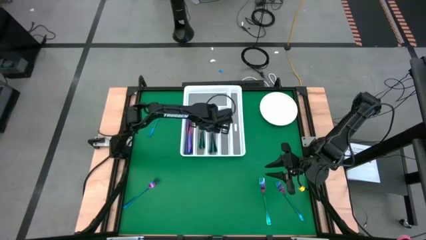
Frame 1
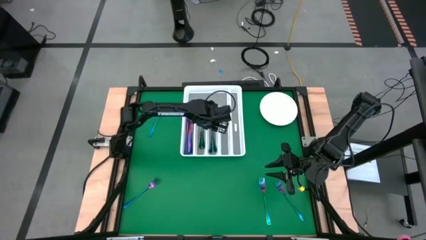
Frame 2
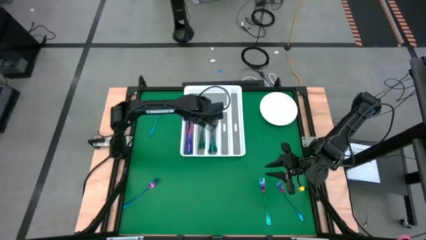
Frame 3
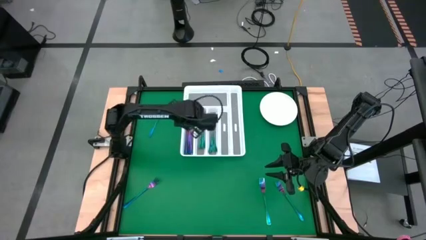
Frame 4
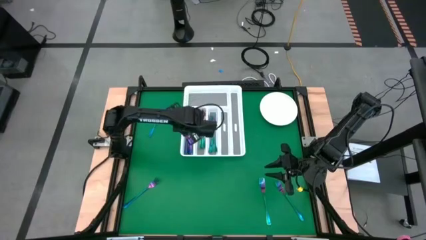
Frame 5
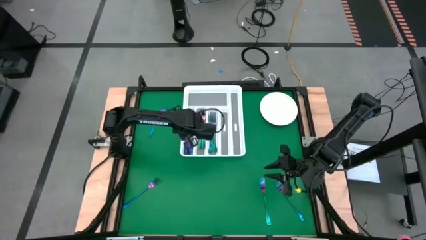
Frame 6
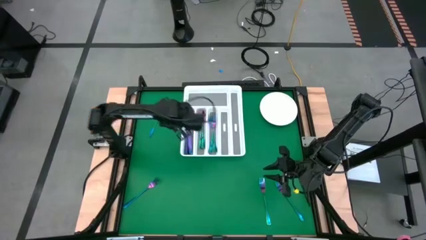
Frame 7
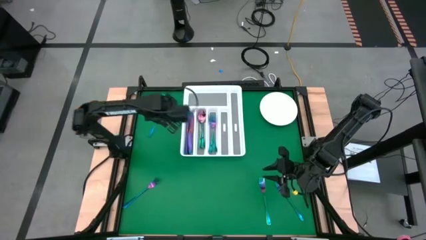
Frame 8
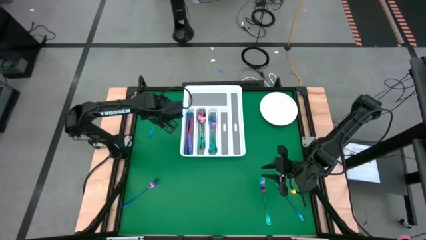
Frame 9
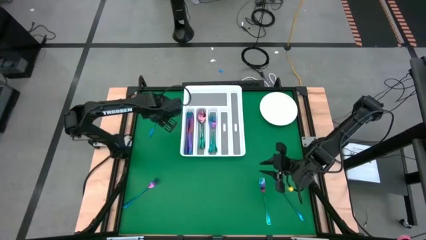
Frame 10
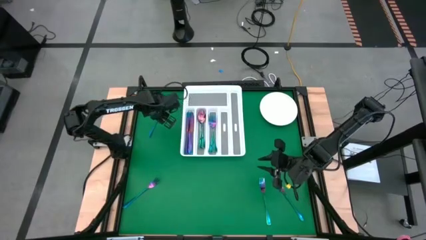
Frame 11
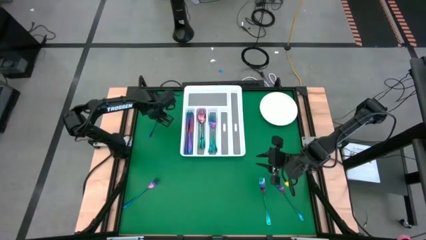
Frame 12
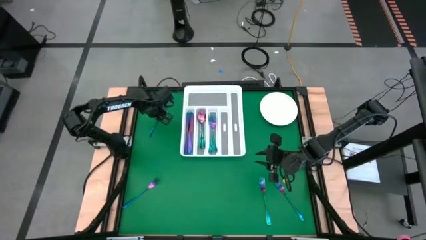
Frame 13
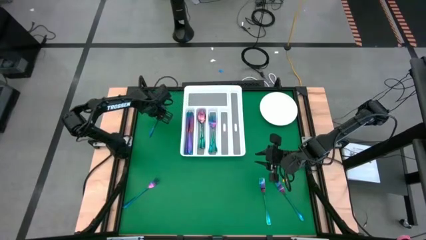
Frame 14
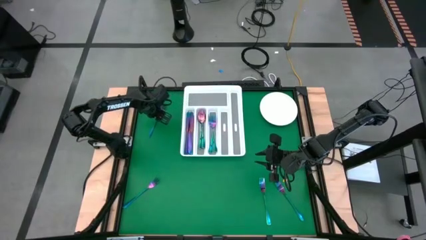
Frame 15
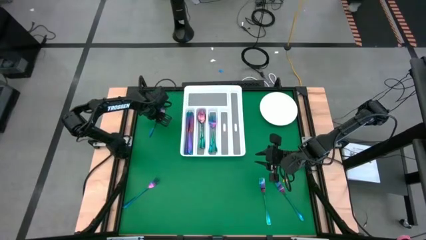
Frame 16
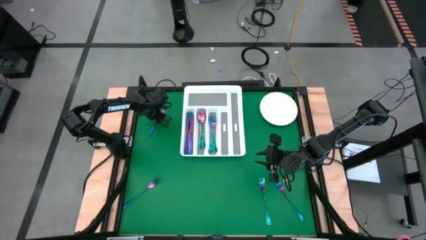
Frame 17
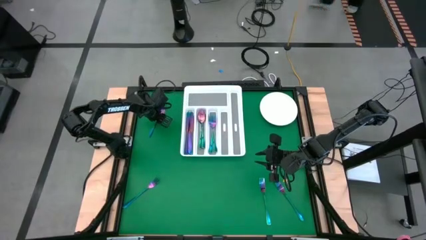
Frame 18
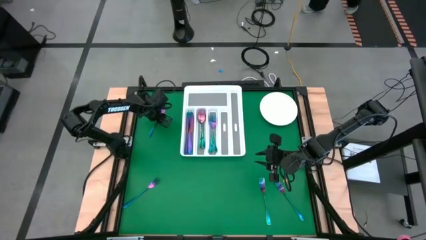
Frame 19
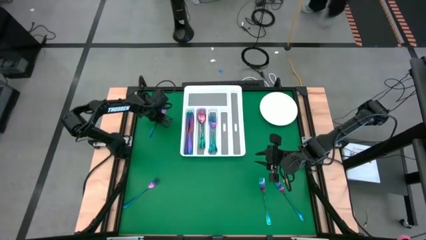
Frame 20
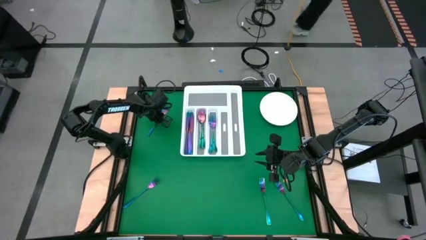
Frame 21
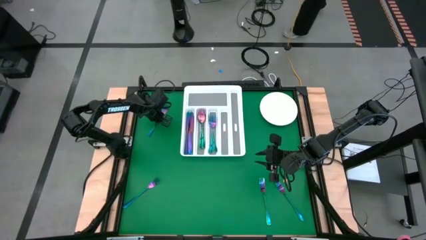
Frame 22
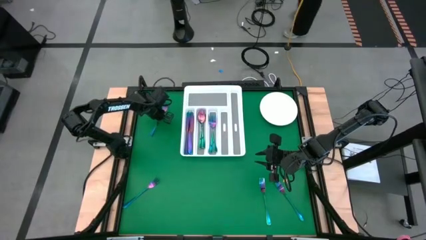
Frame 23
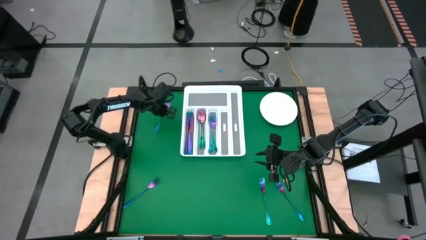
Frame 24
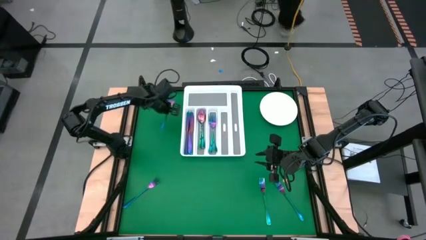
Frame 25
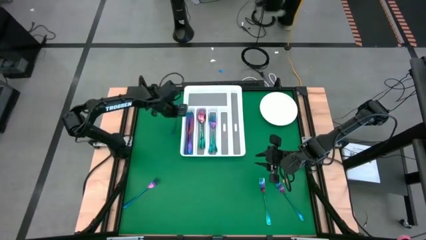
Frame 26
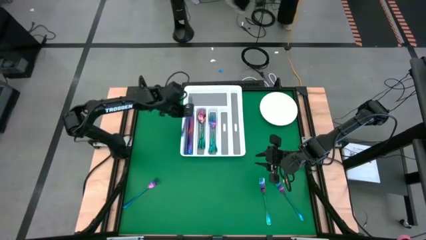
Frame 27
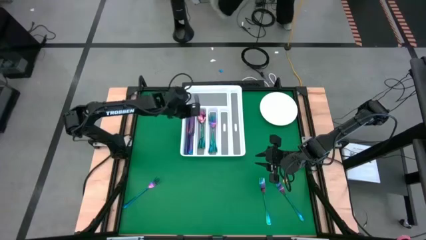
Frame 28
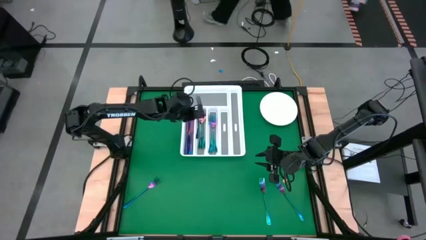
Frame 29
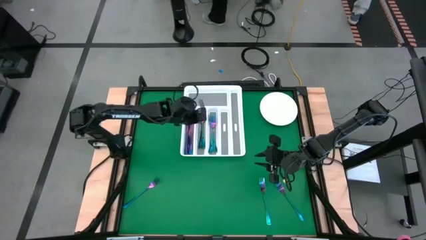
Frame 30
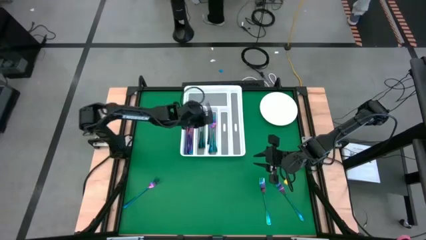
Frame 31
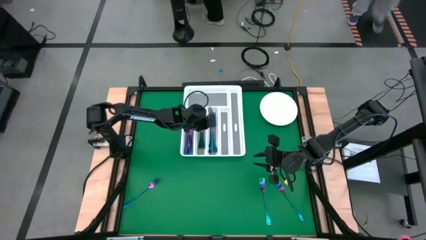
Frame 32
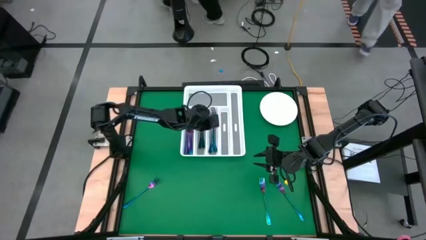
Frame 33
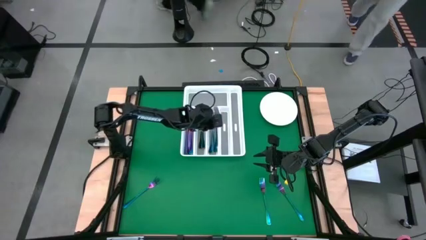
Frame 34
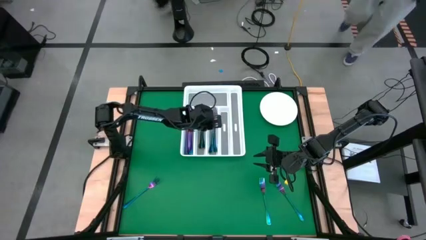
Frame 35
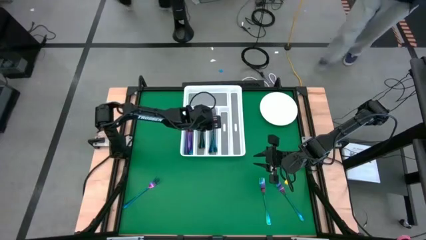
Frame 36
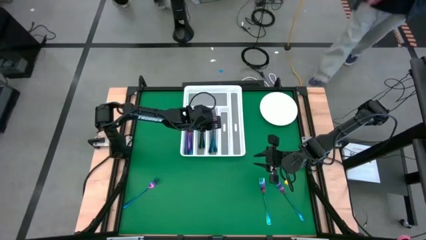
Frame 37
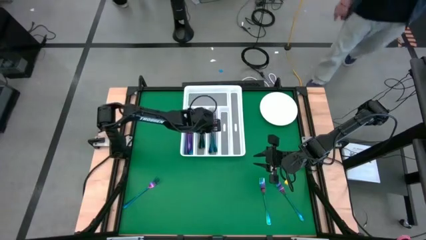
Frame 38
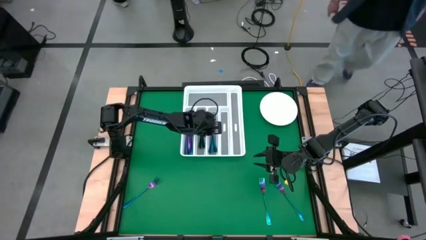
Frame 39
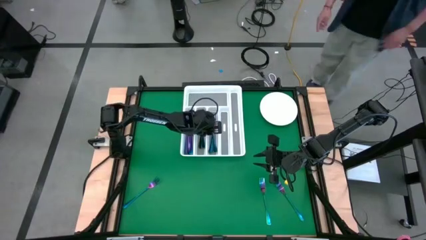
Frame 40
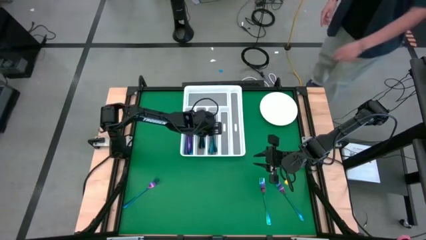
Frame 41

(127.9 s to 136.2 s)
Task: Sort silverware
Put the blue fork into the silverware tray

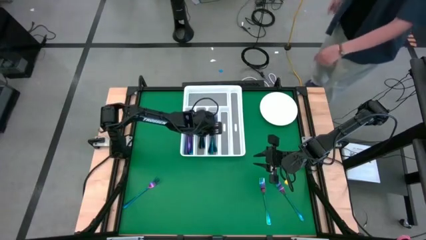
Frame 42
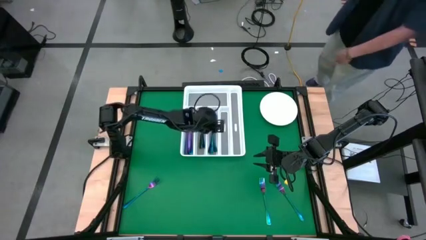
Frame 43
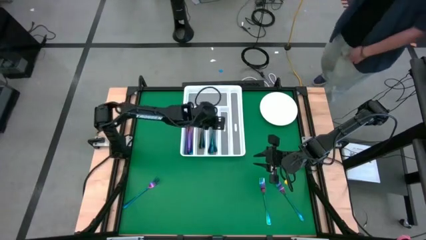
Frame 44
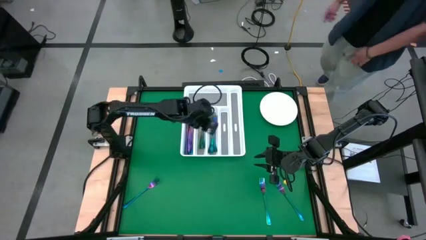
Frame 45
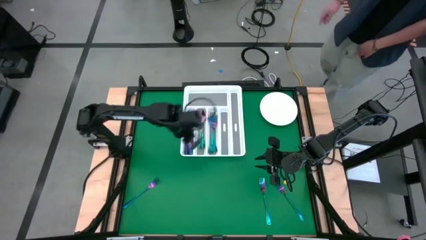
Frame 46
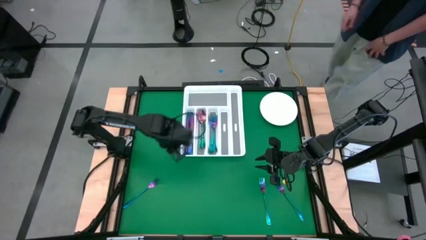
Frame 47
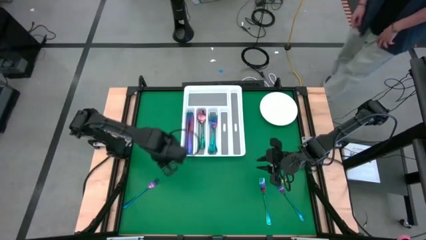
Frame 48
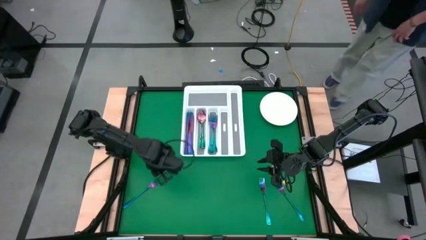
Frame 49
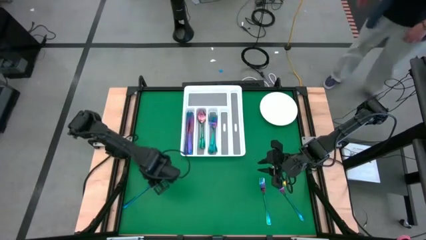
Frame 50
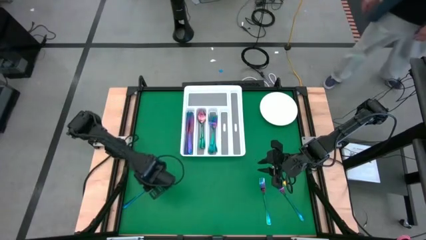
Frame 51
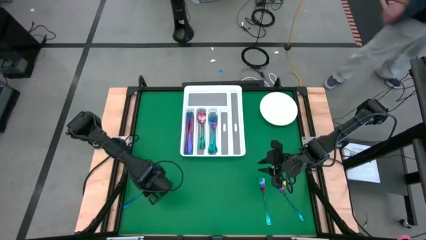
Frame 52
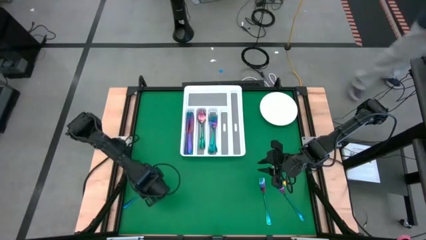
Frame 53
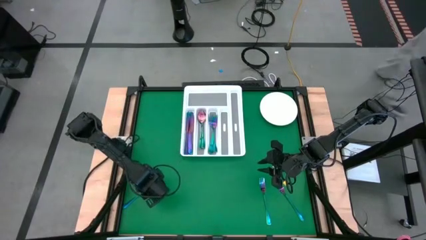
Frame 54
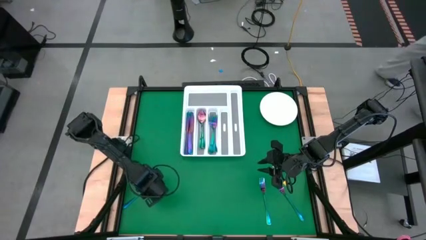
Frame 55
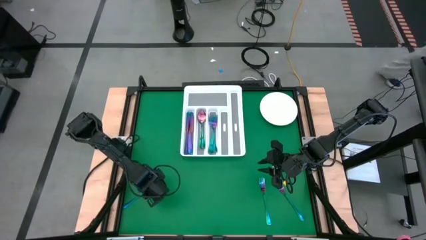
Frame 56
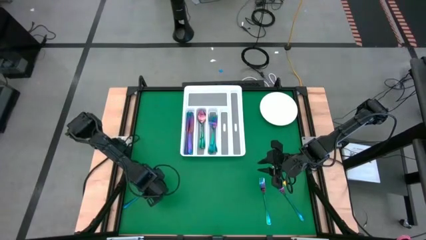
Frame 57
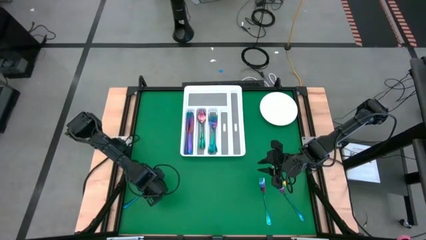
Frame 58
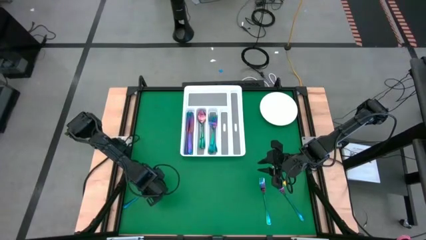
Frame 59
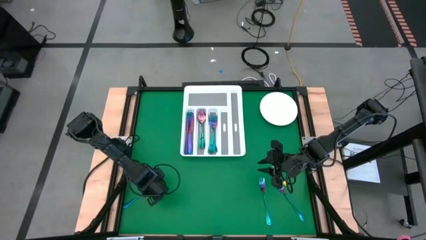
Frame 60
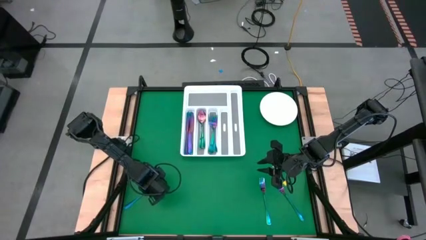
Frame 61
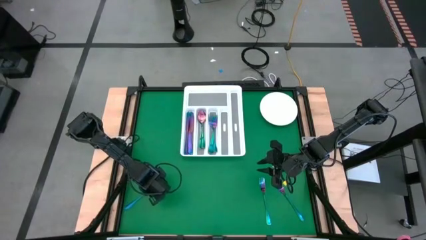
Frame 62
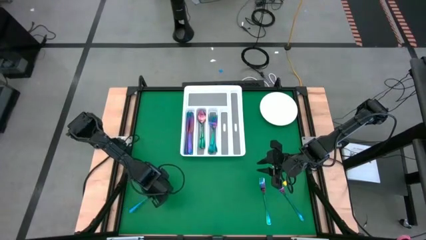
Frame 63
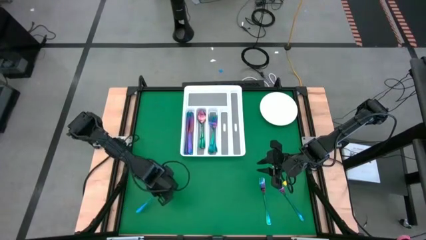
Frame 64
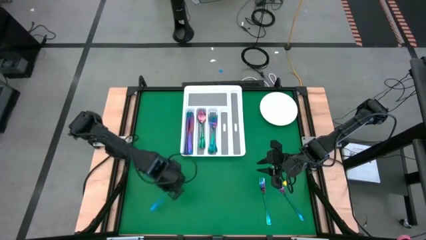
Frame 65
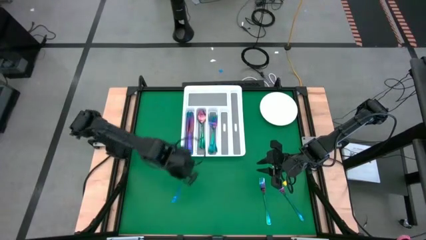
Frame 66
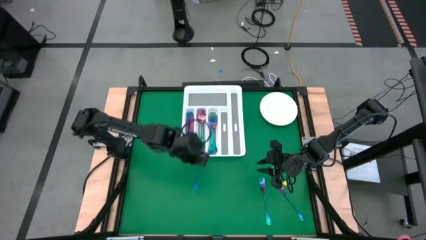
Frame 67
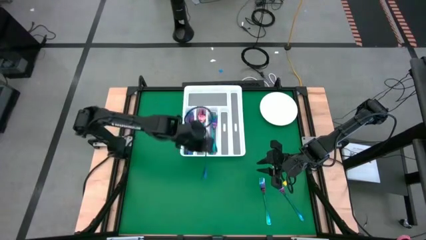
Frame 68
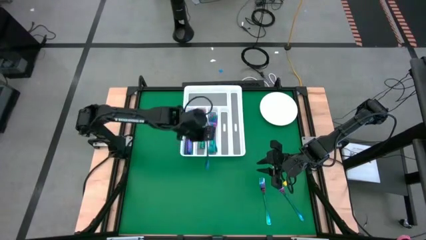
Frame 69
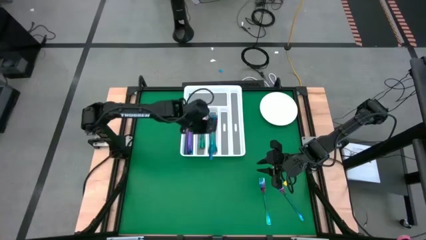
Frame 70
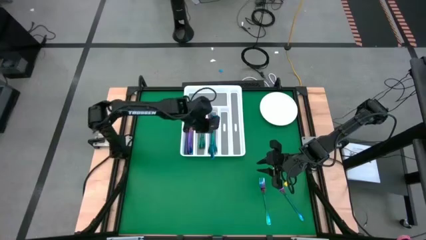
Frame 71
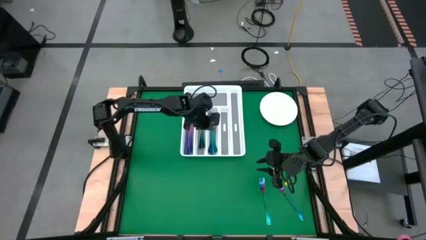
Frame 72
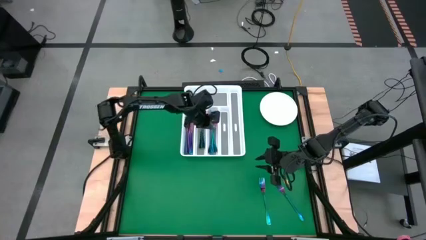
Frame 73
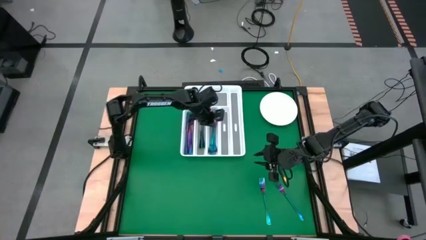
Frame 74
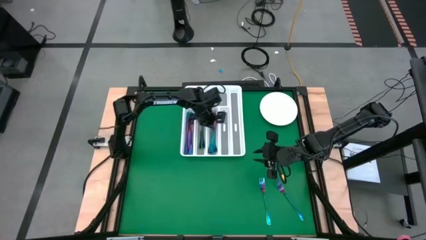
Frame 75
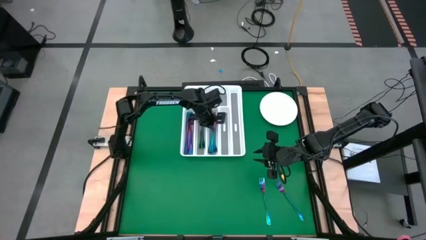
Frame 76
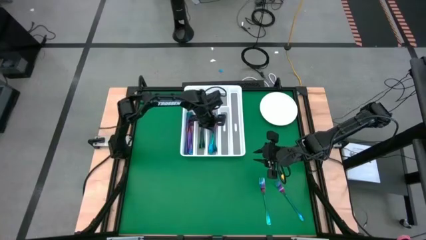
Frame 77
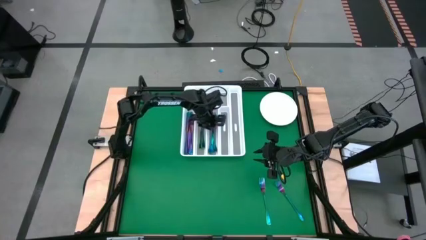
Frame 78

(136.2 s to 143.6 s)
Put the blue fork into the silverware tray
